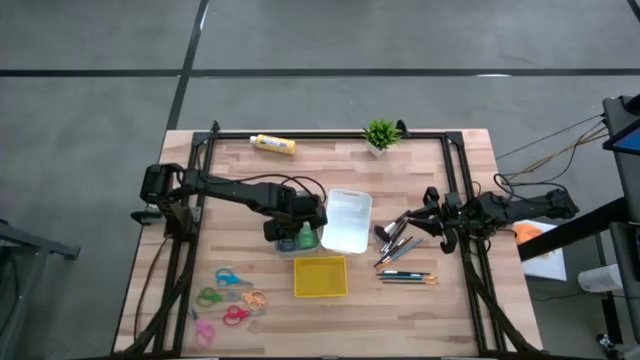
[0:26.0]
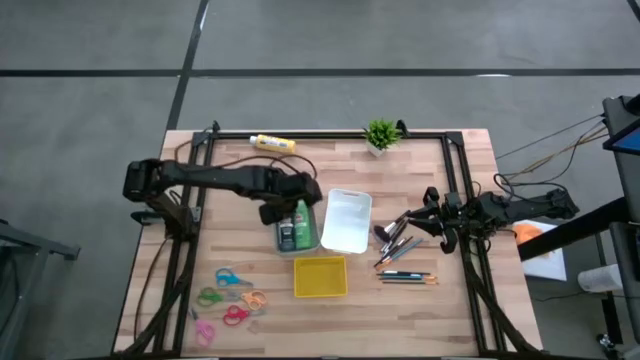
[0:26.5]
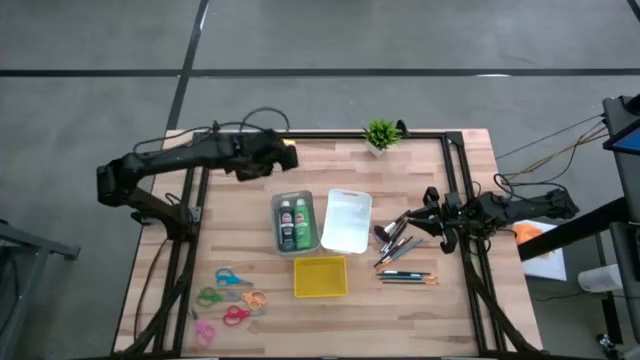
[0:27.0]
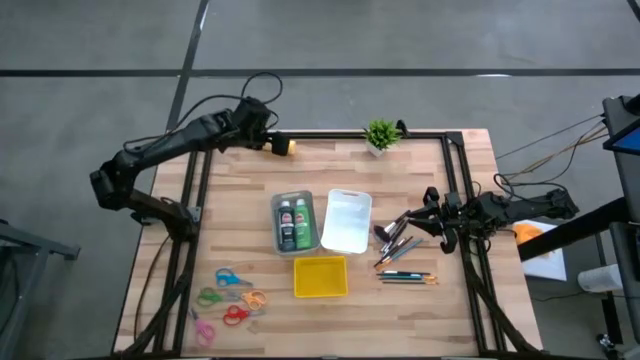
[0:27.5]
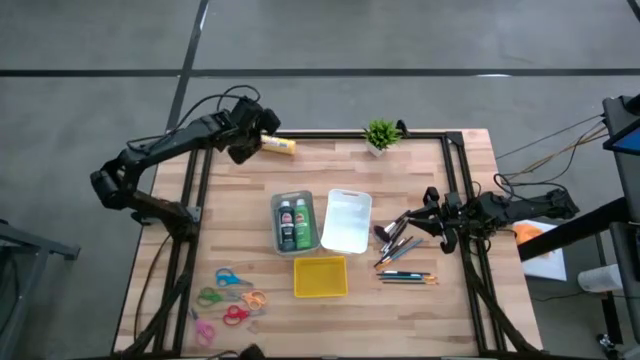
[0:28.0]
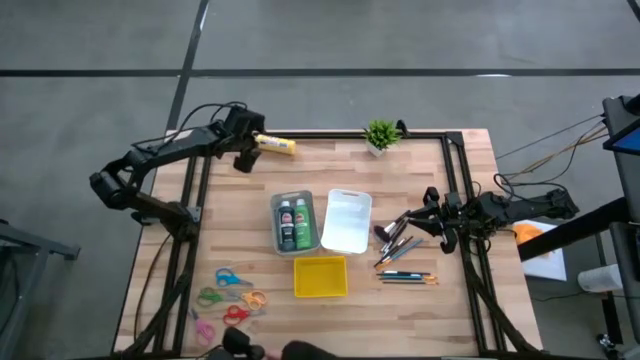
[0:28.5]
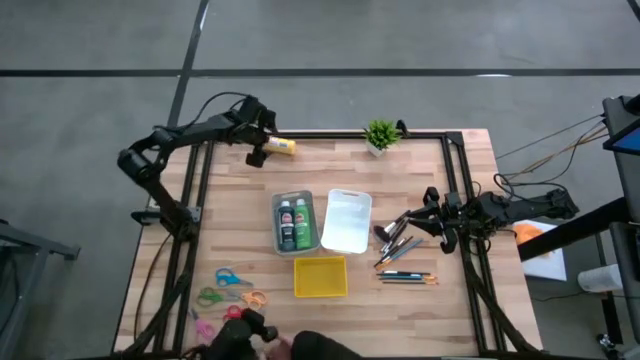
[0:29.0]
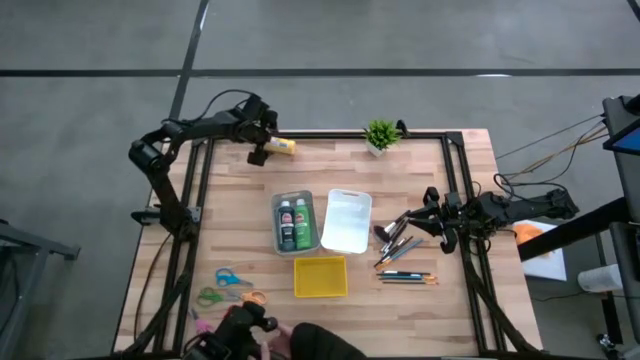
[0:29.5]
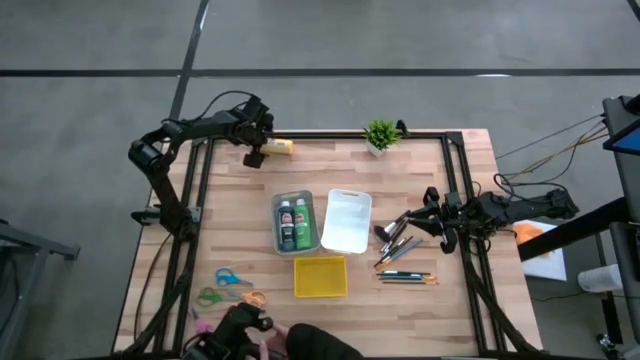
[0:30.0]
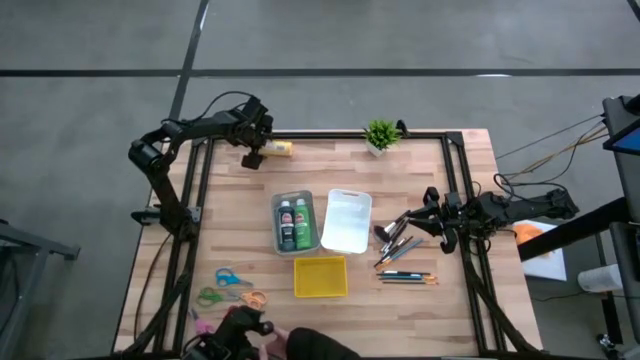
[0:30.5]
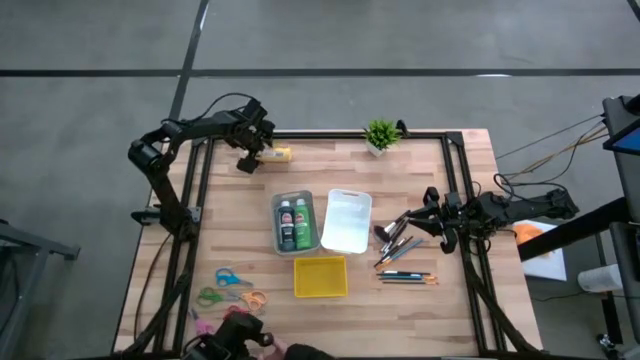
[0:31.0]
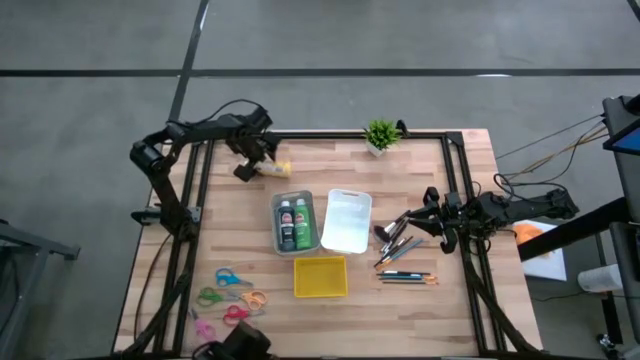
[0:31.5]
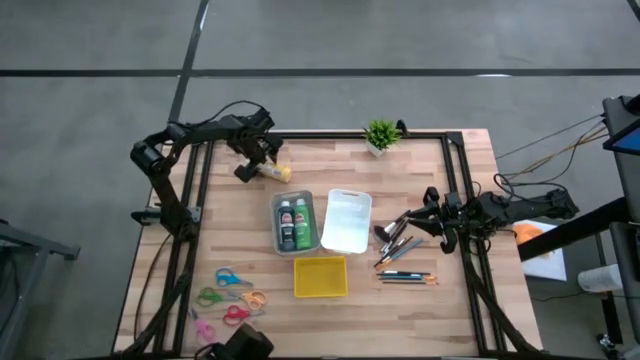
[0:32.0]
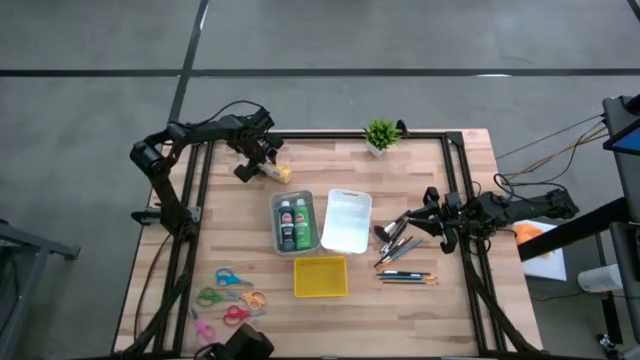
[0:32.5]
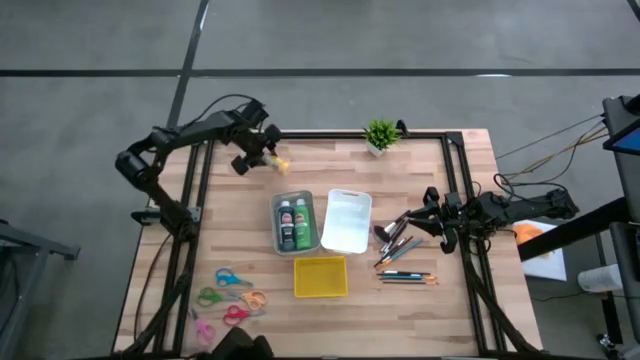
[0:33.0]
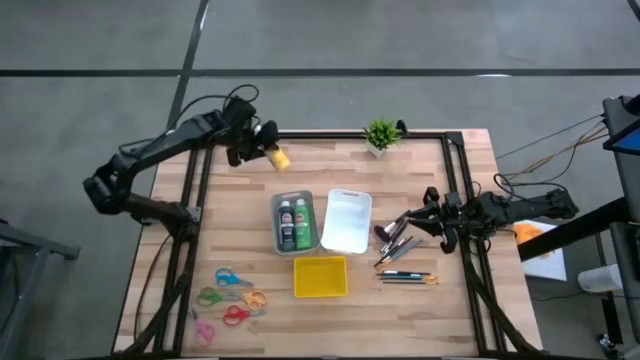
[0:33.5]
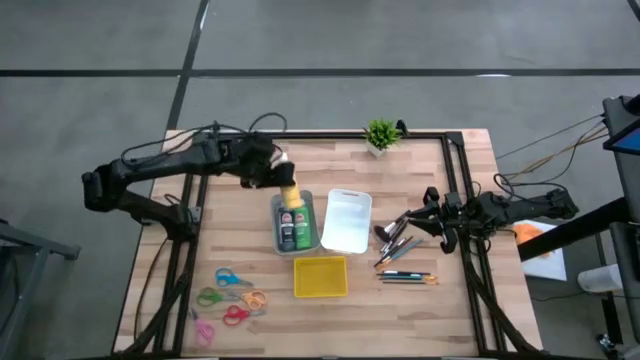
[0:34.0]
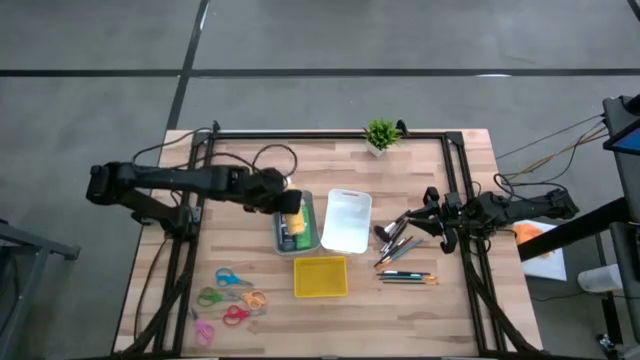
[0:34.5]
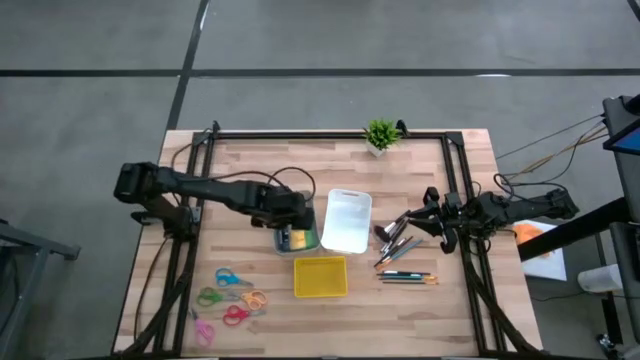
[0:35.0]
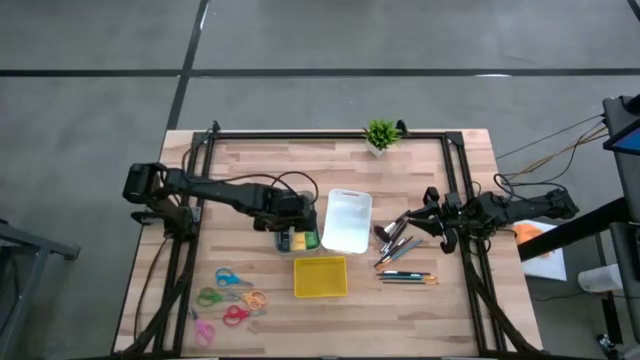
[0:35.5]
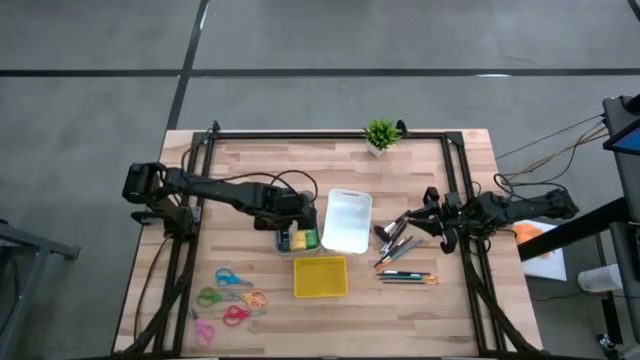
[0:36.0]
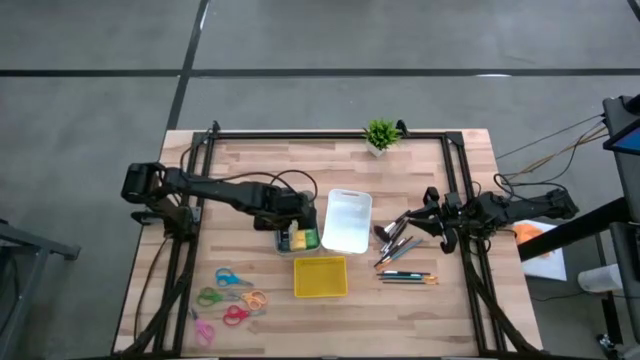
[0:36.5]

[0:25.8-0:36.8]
Task: Pick & Place Paint Supplies
Put the yellow paint bottle into the gray bin

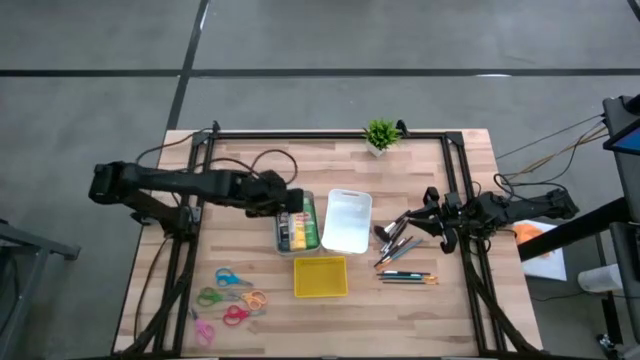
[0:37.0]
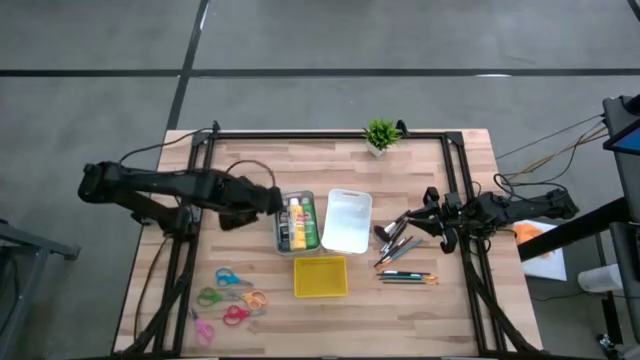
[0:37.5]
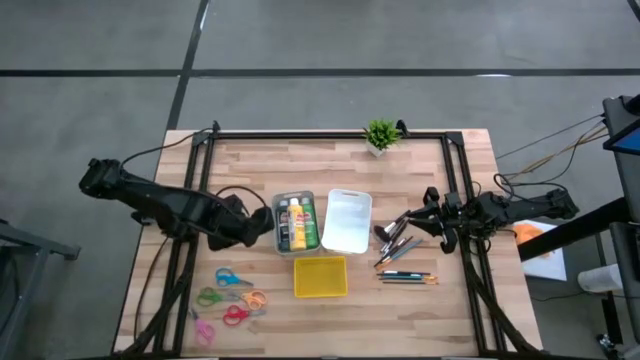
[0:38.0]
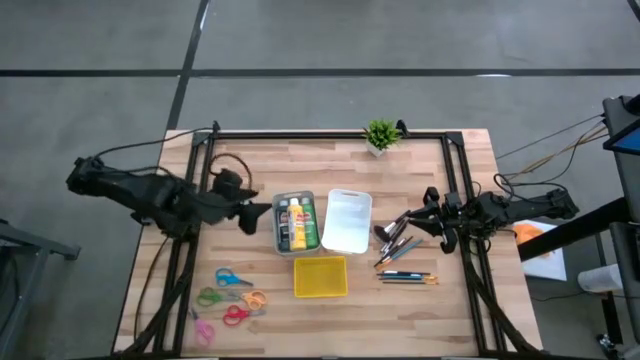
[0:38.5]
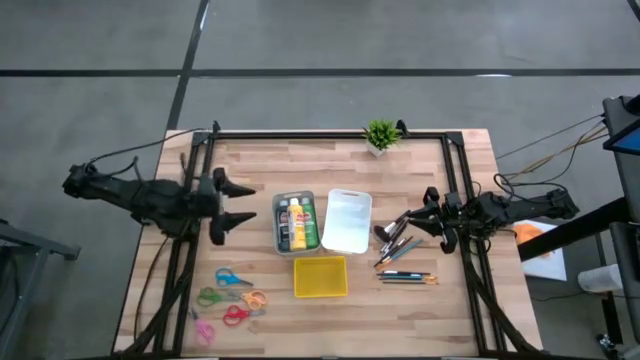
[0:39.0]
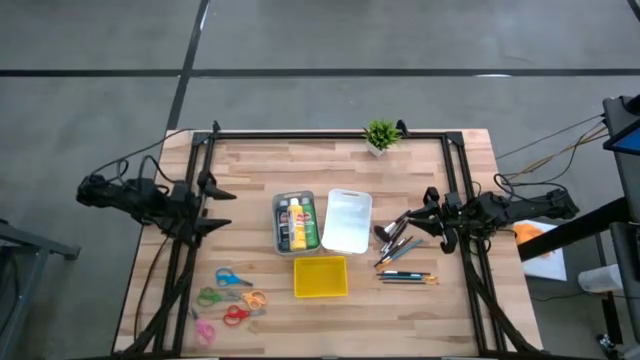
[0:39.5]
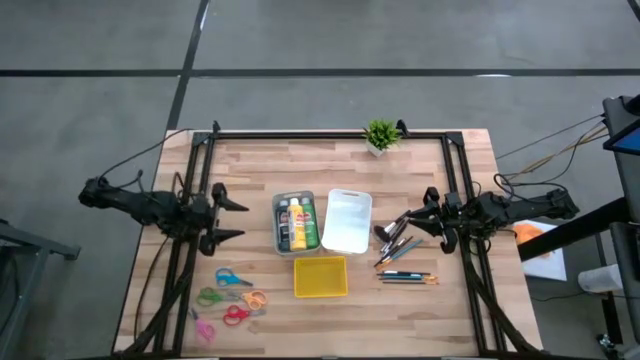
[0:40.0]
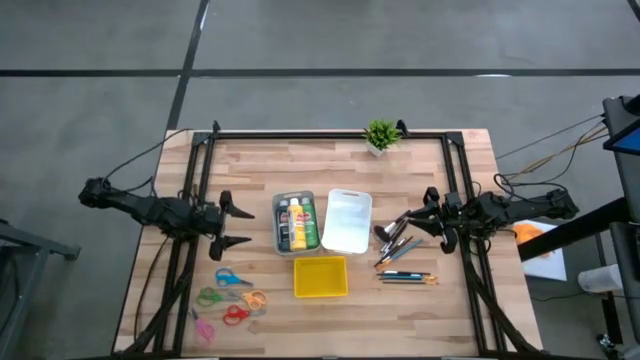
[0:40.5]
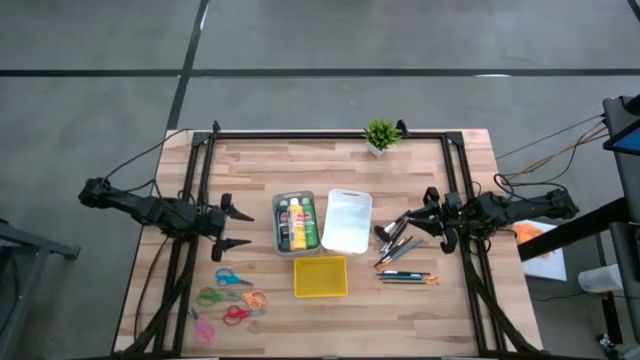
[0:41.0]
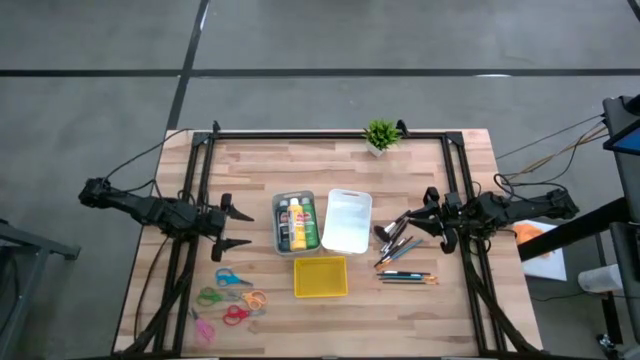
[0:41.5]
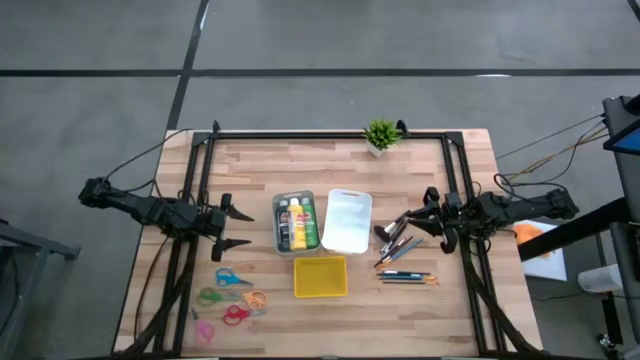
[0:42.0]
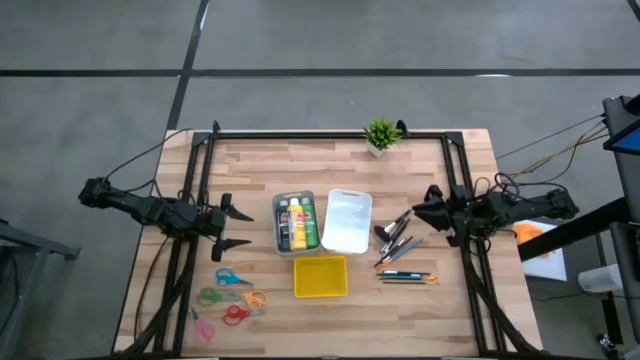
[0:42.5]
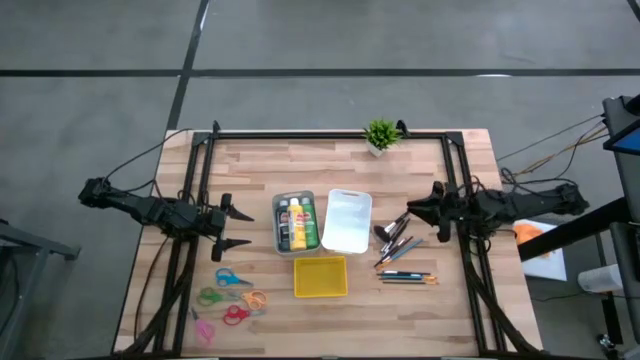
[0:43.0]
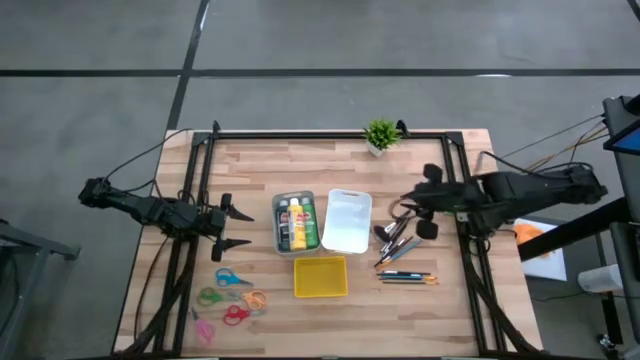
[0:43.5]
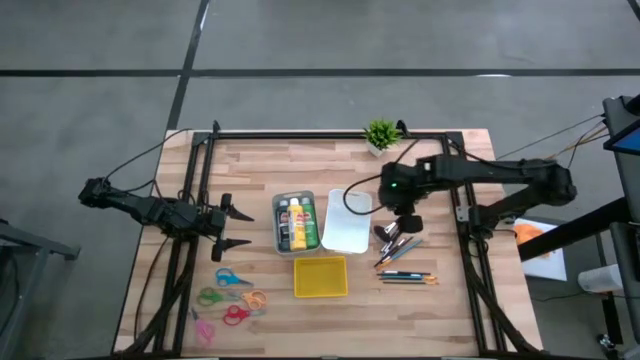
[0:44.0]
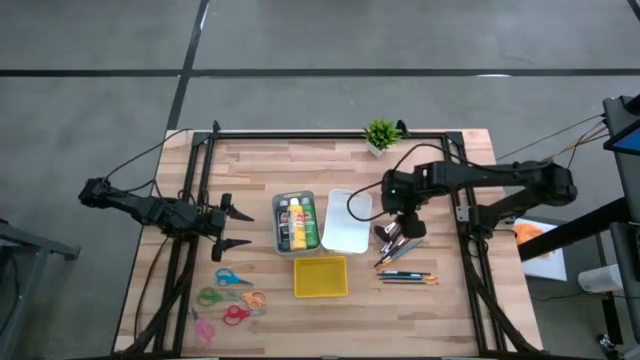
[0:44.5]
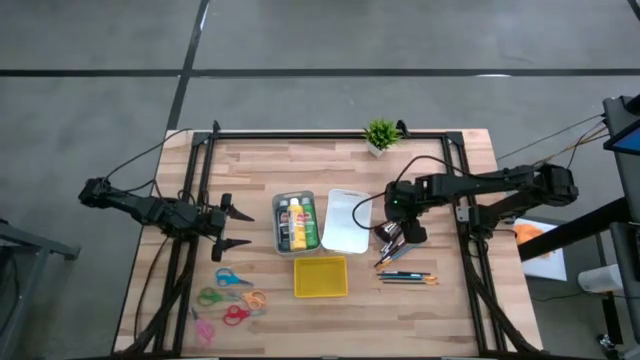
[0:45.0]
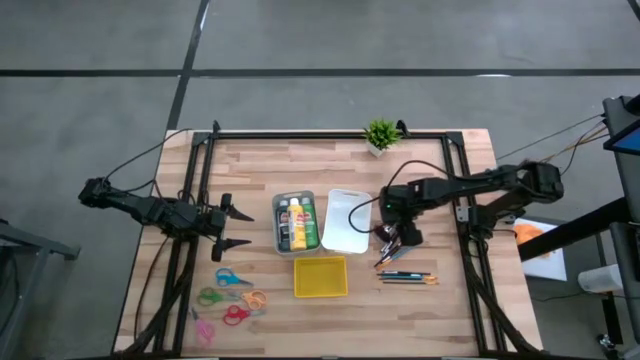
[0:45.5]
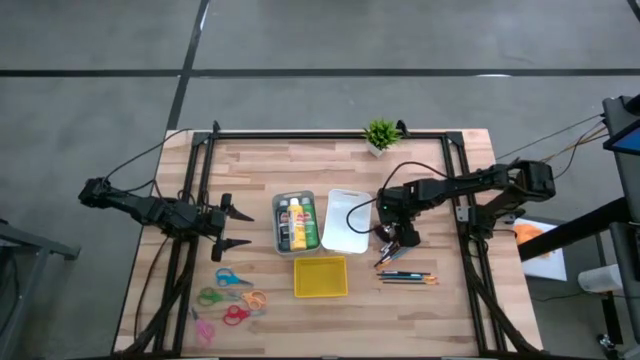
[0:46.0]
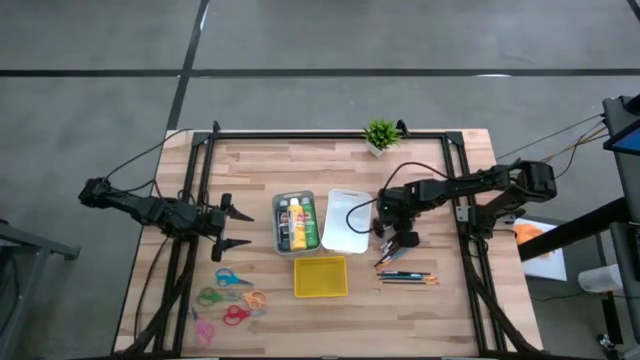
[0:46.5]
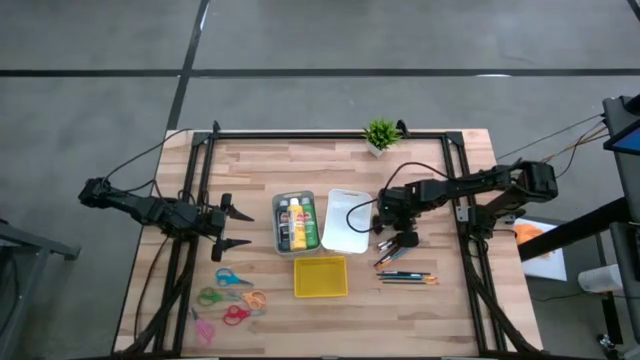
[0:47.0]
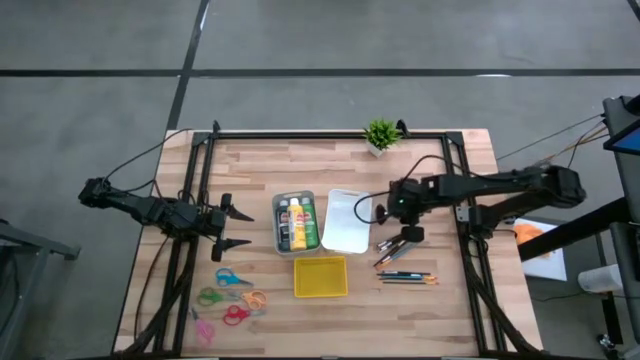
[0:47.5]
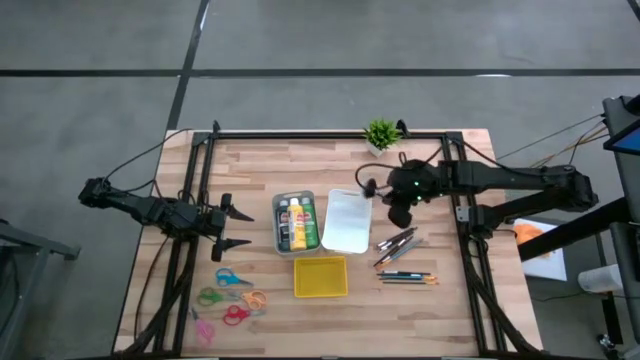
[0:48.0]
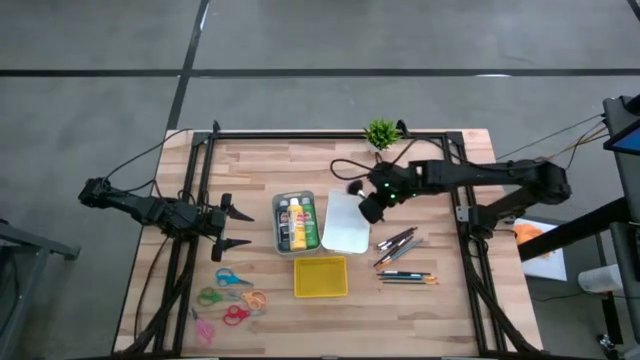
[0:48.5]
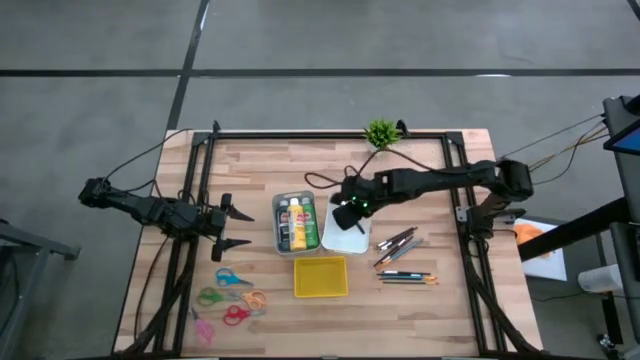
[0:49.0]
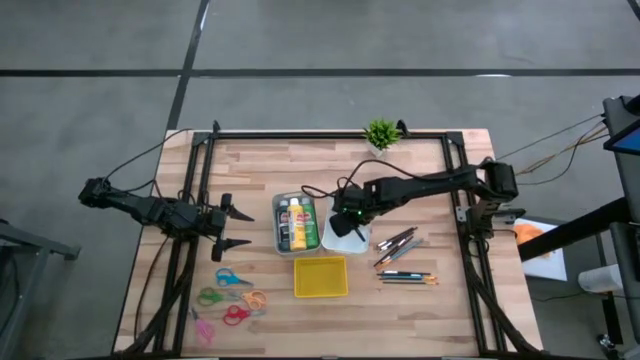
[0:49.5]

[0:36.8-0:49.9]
Put the silver paint brush into the white bin
